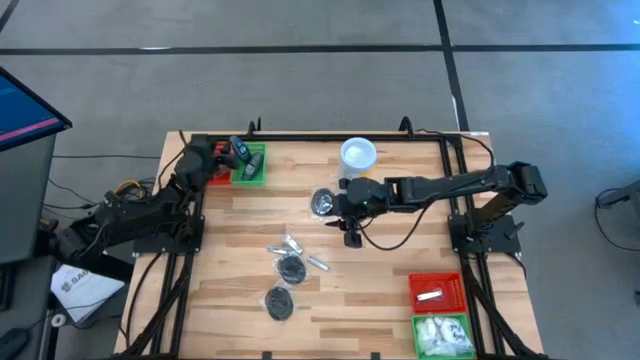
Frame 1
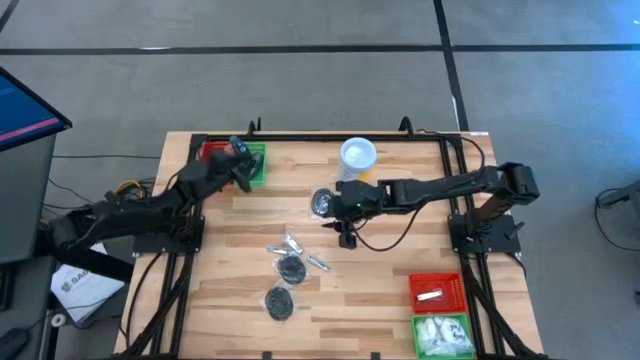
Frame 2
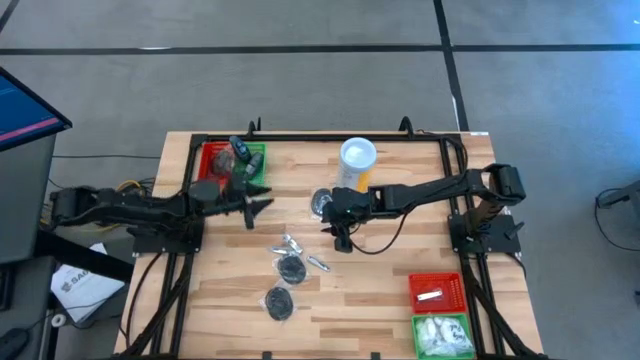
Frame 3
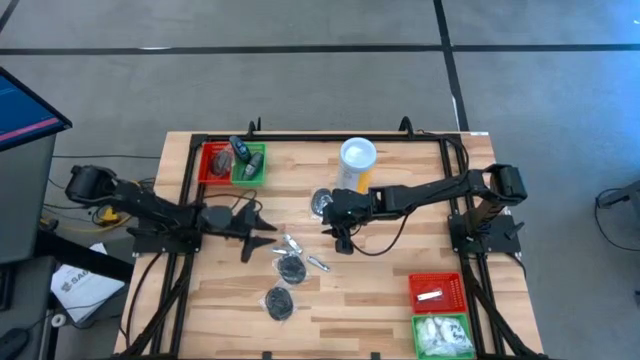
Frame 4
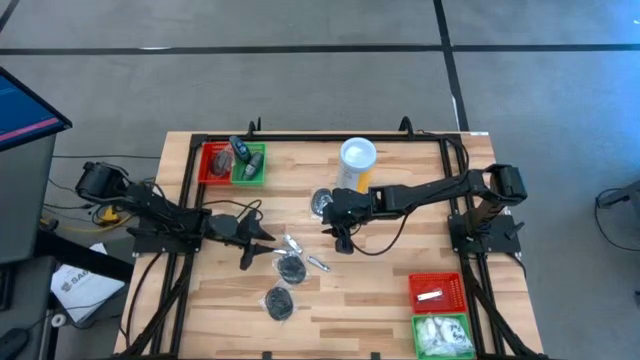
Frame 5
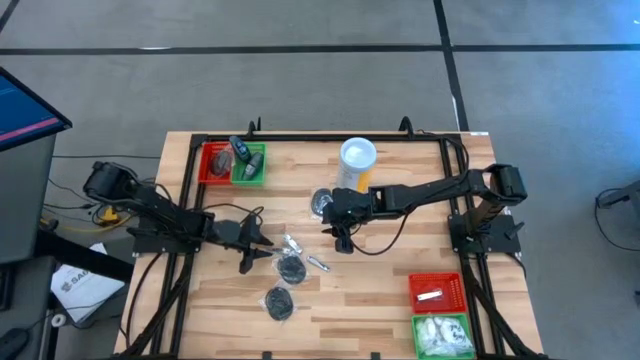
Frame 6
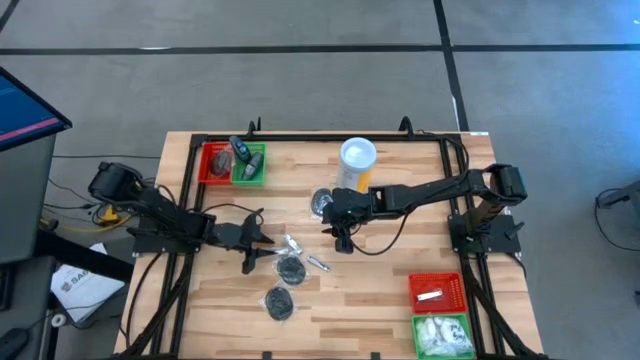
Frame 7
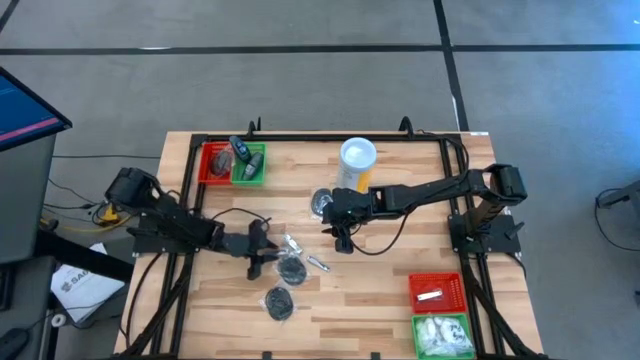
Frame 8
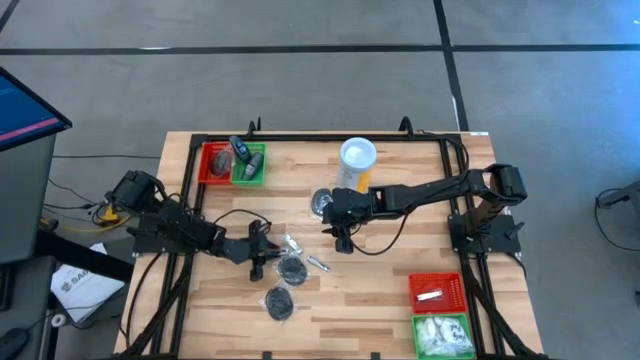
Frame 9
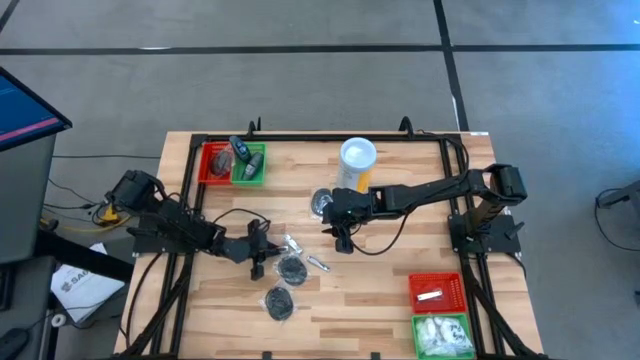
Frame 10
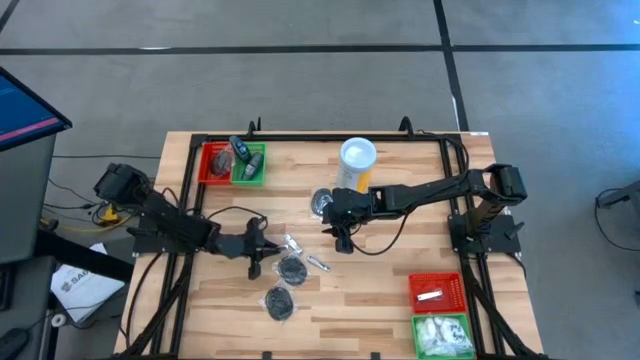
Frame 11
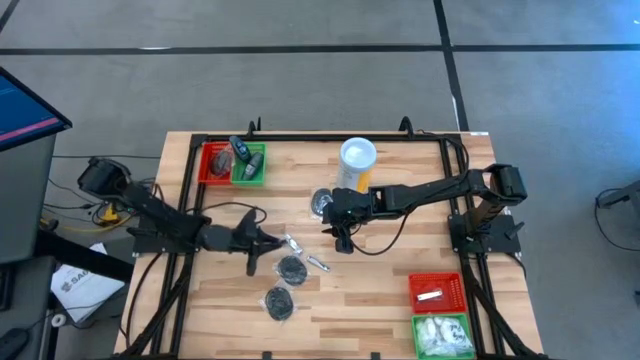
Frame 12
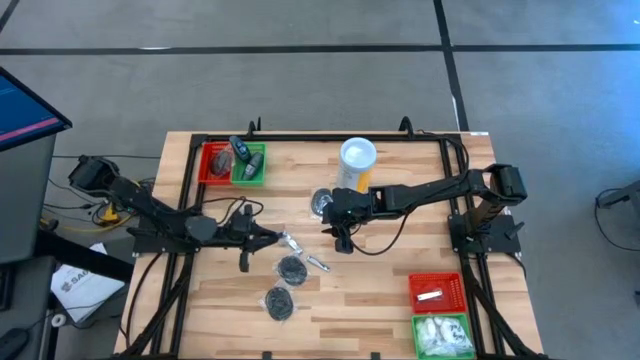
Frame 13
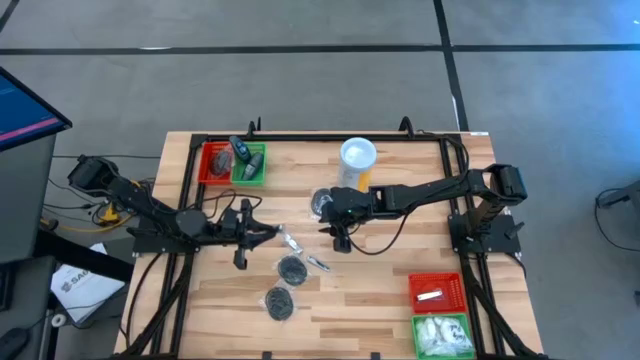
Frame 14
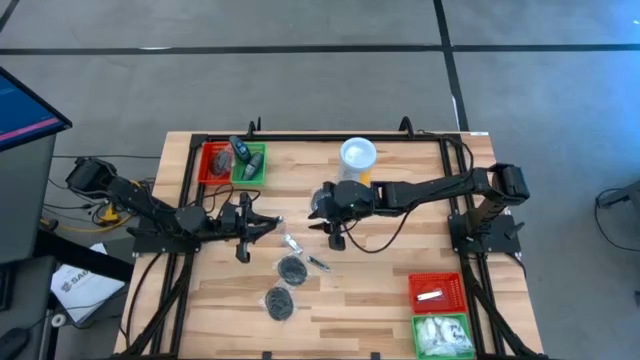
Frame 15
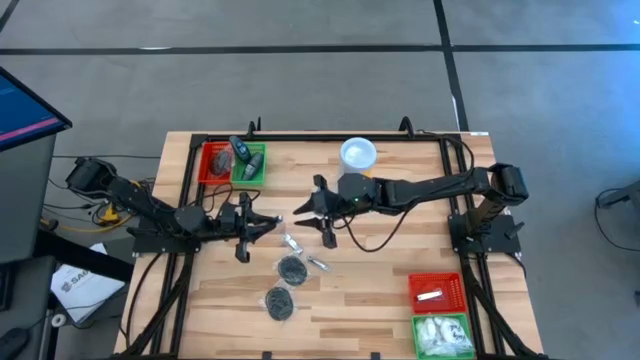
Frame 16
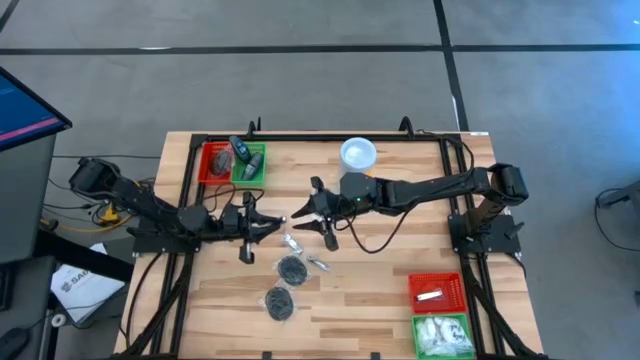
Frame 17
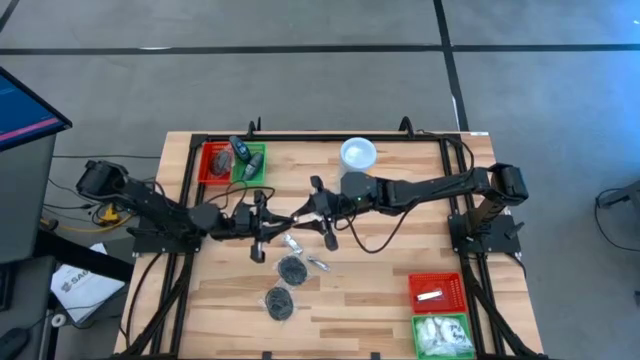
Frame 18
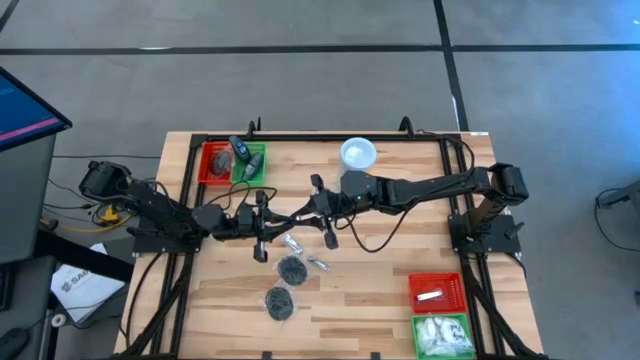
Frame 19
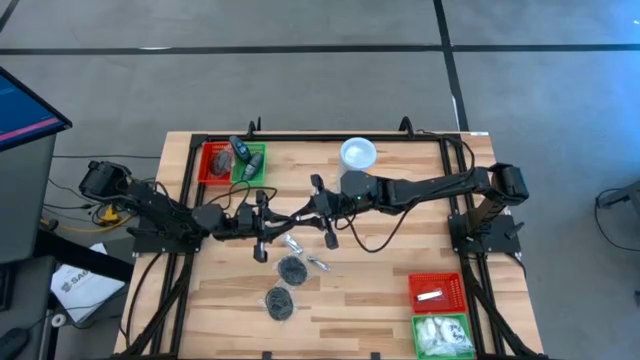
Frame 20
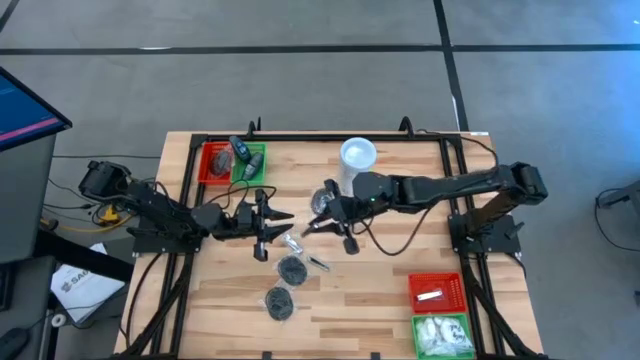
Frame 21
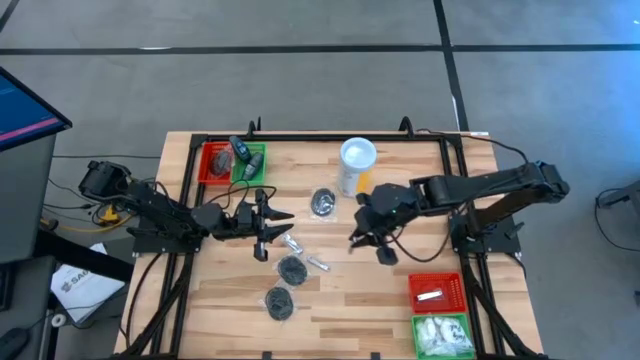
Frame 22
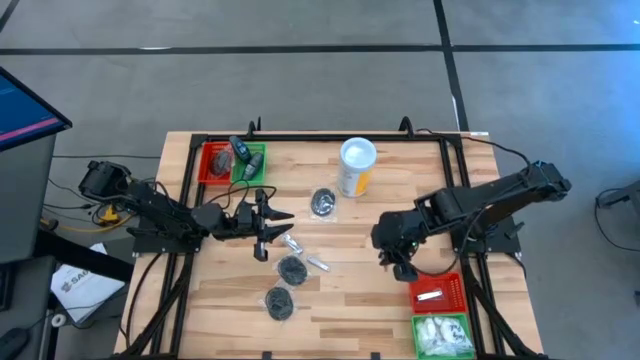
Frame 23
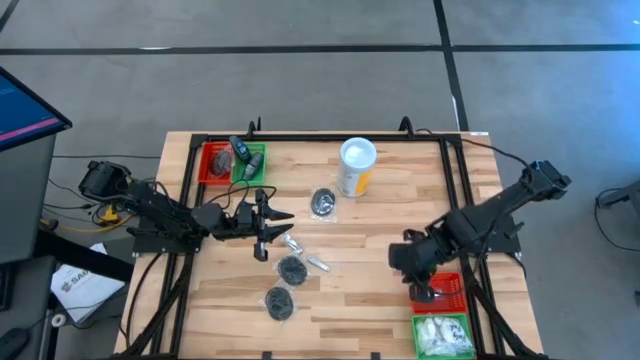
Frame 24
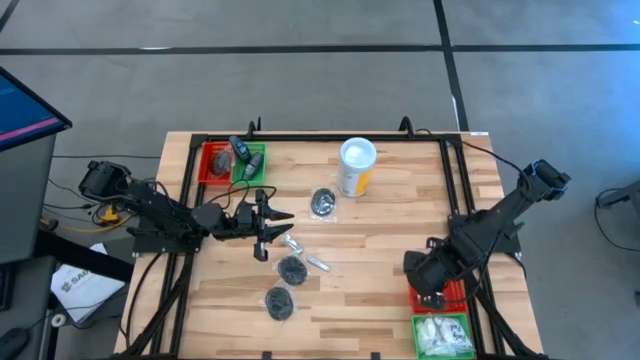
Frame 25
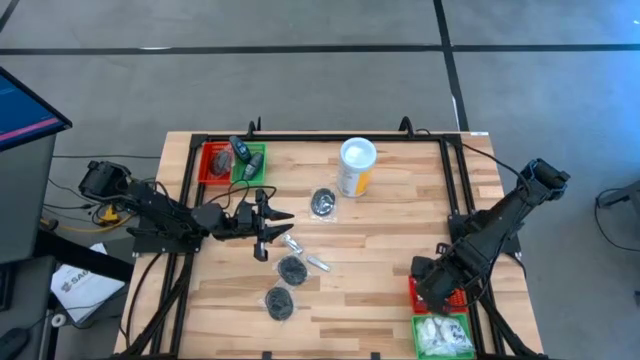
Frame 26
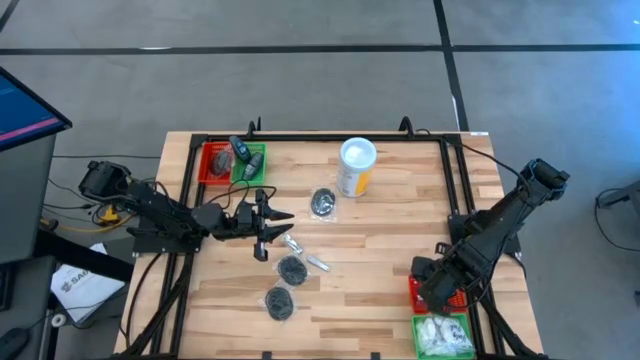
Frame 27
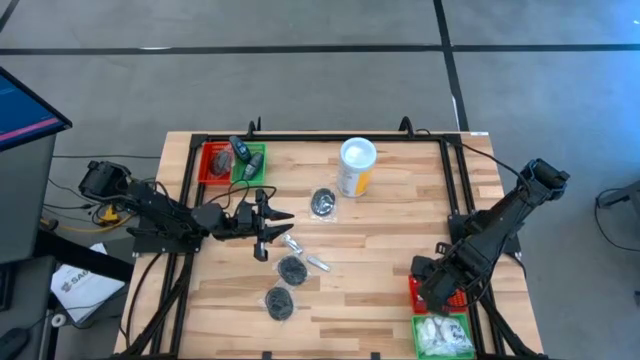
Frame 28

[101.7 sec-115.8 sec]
Task: Pick & Place Travel size toiletries
Put the silver nail cutter into the bottom red bin

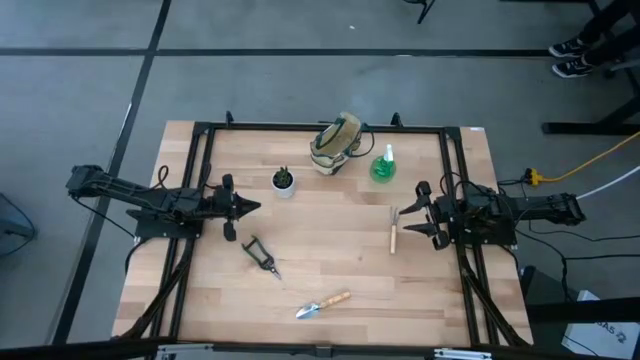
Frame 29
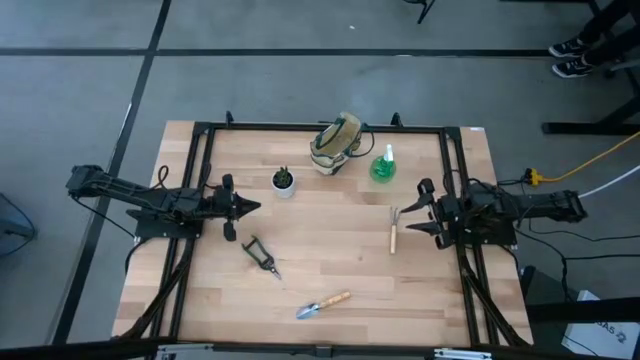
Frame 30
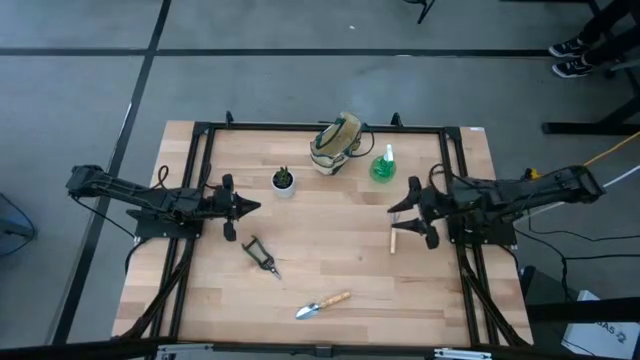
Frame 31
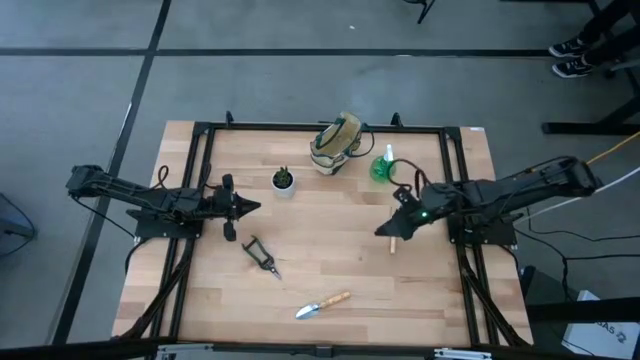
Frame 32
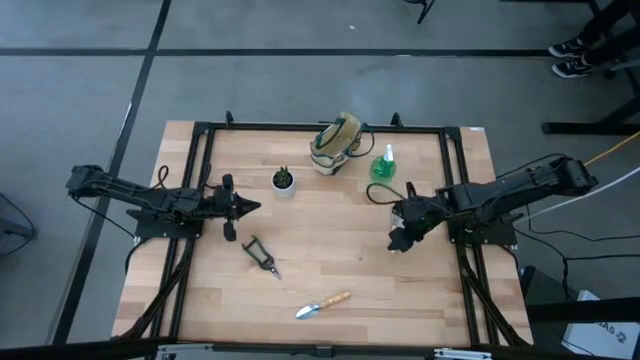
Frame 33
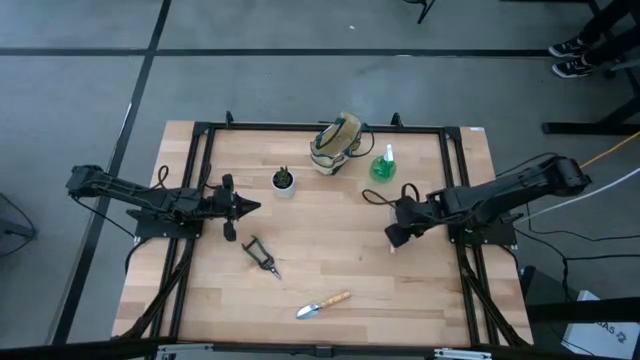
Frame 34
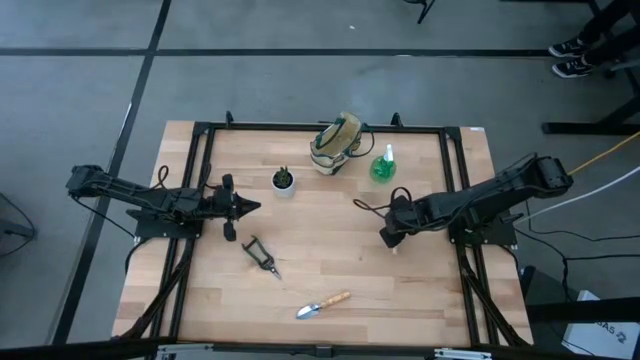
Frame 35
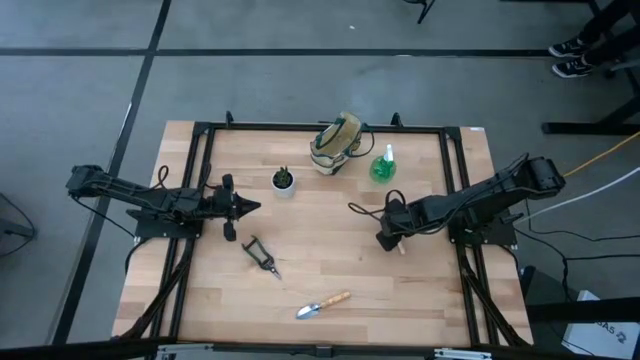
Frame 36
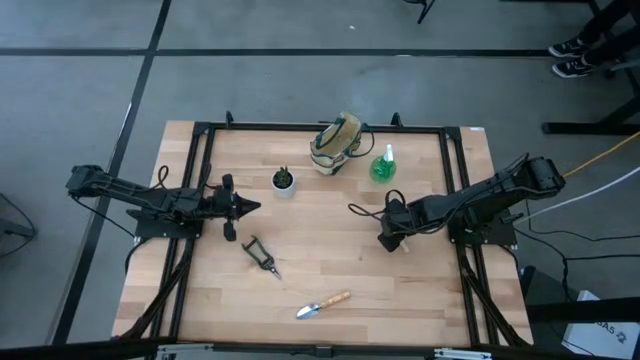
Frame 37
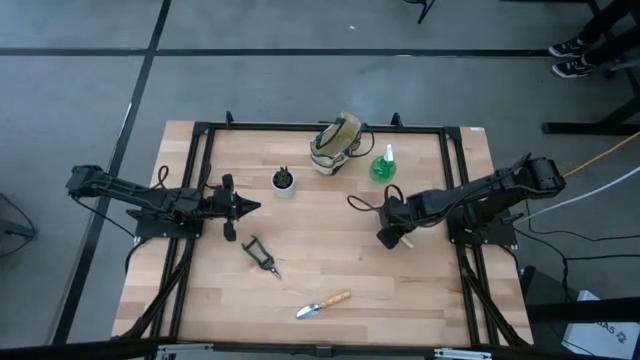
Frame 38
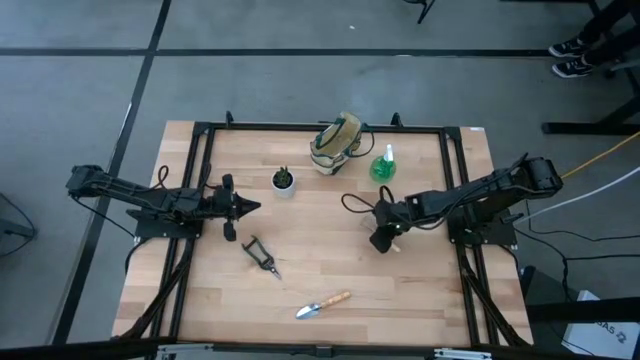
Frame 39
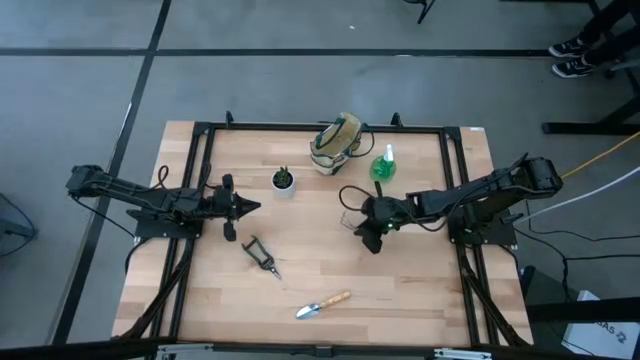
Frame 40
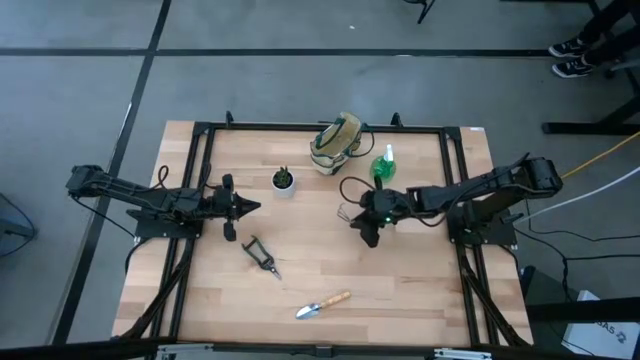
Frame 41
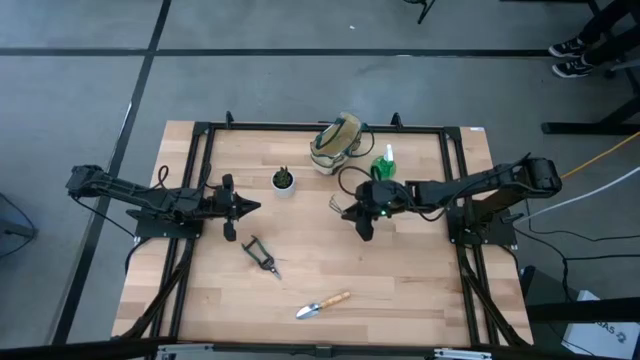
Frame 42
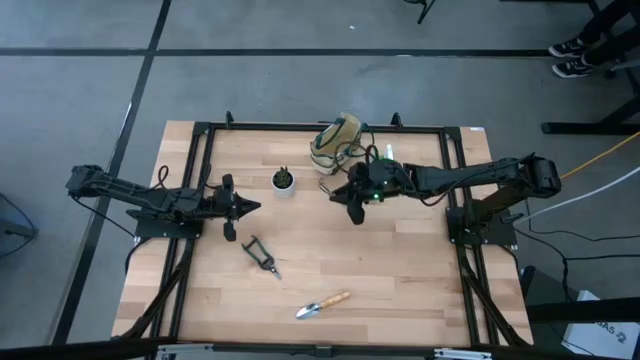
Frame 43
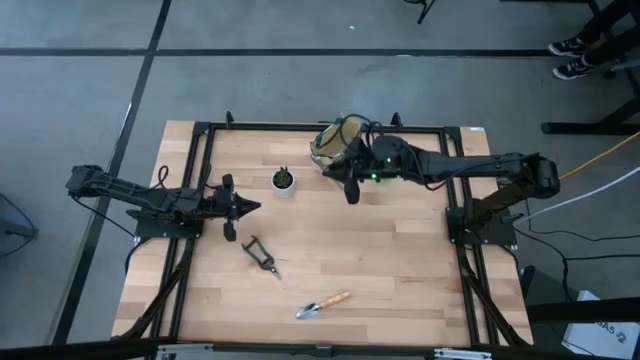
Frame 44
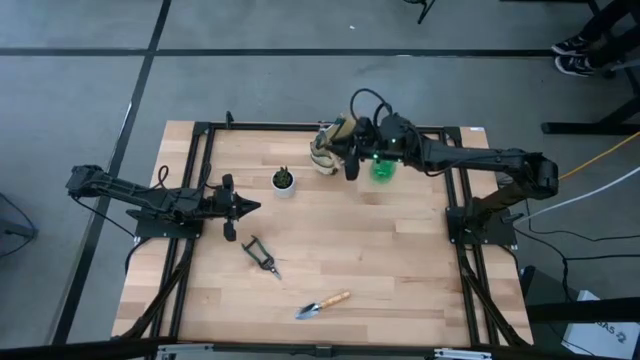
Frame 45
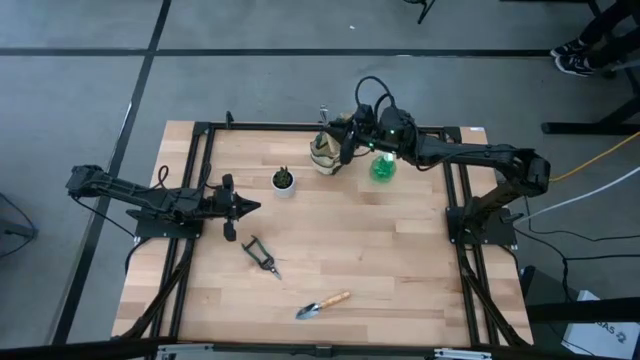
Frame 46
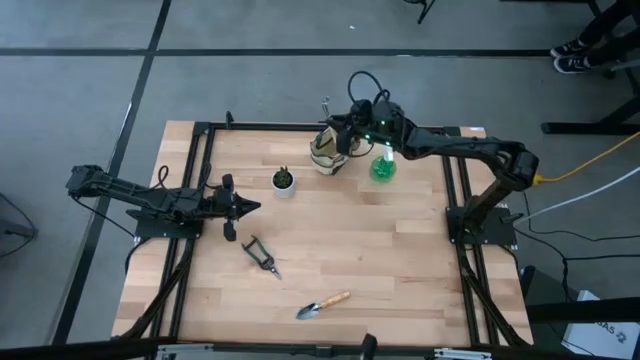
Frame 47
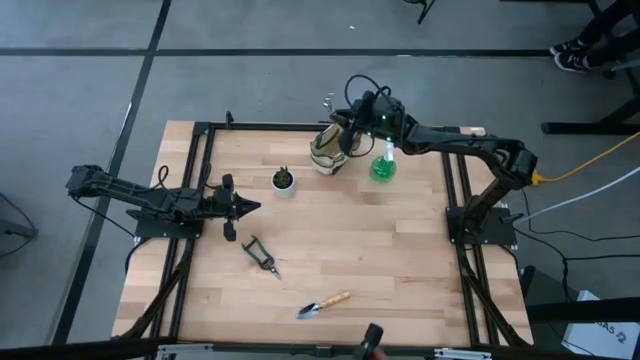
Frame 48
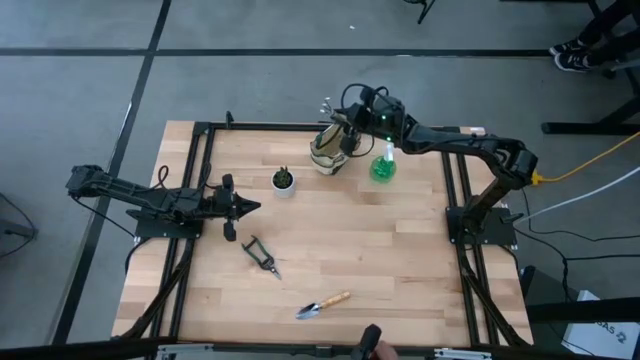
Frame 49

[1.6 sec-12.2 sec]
Task: Pick & Place Garden tools in Gardening bag
Put the hand rake into the gardening bag
